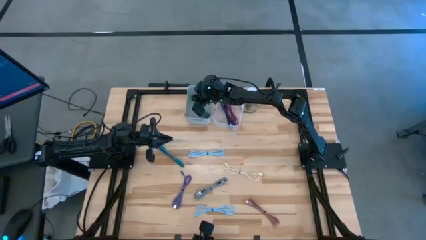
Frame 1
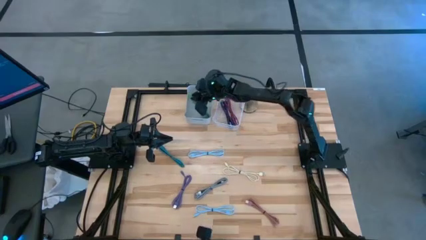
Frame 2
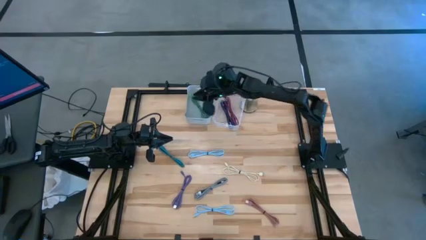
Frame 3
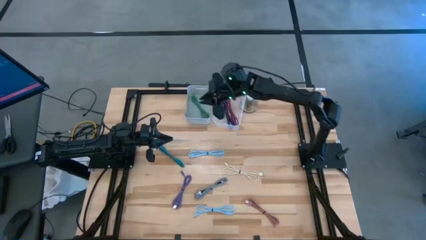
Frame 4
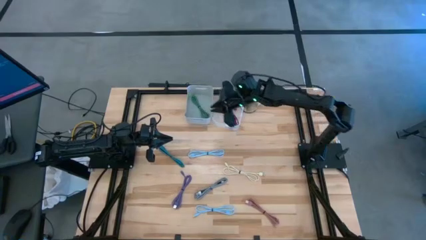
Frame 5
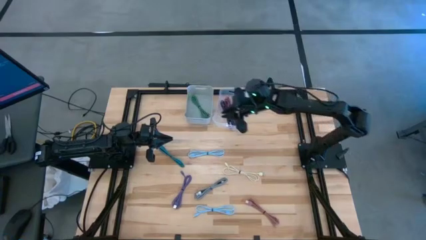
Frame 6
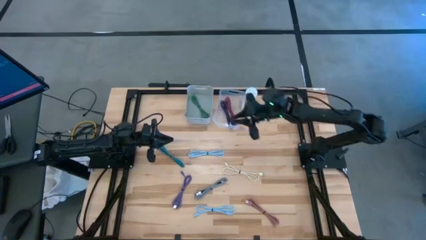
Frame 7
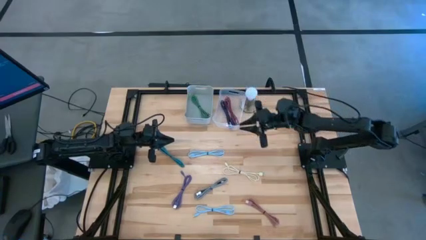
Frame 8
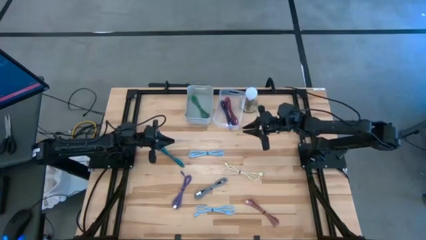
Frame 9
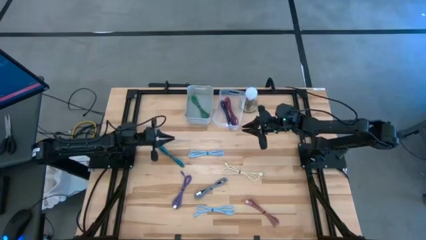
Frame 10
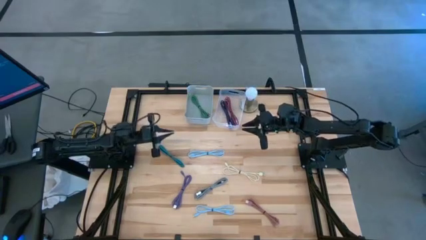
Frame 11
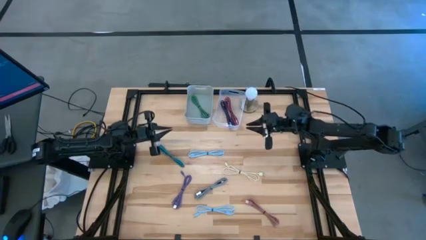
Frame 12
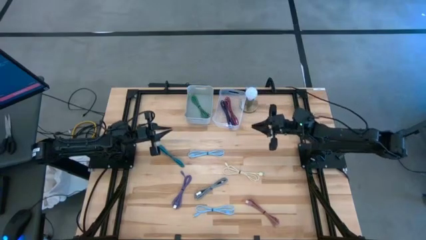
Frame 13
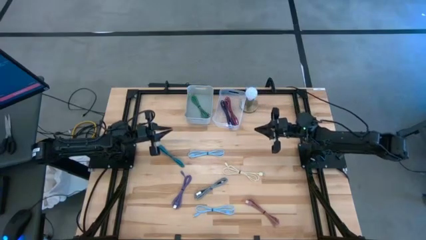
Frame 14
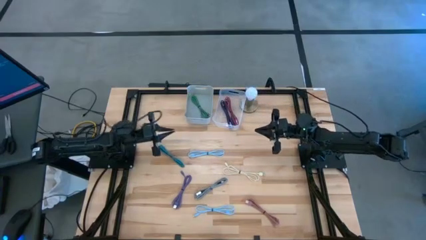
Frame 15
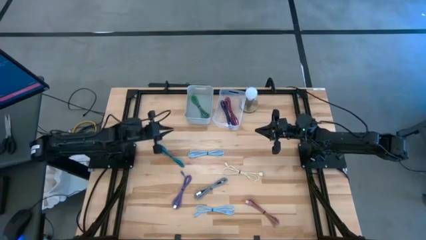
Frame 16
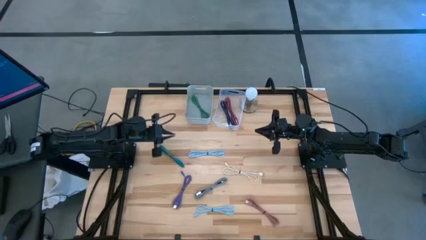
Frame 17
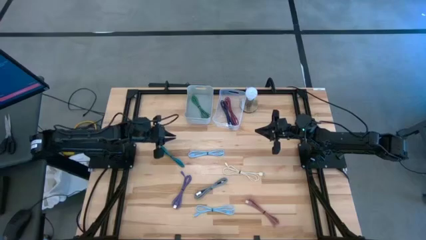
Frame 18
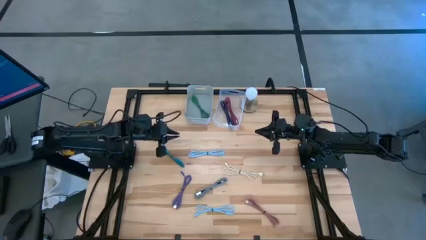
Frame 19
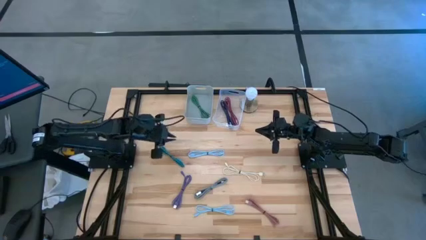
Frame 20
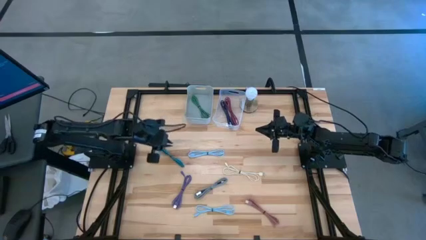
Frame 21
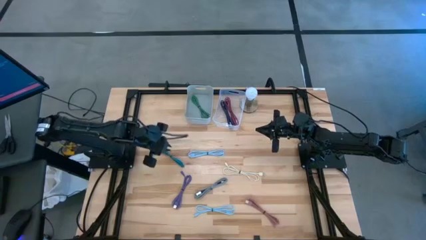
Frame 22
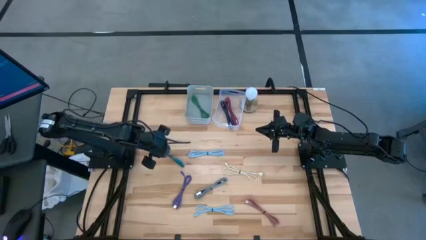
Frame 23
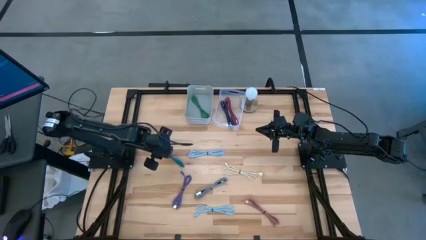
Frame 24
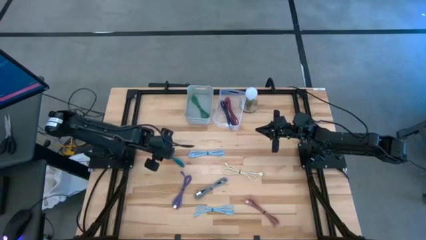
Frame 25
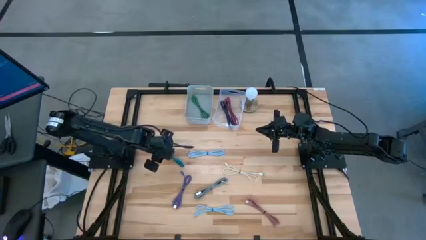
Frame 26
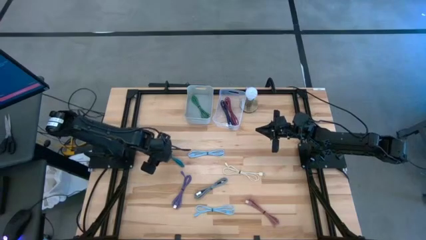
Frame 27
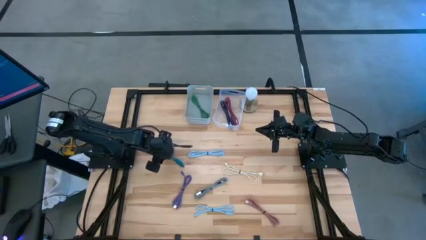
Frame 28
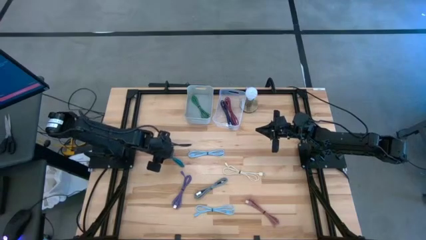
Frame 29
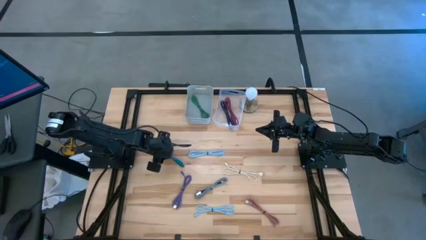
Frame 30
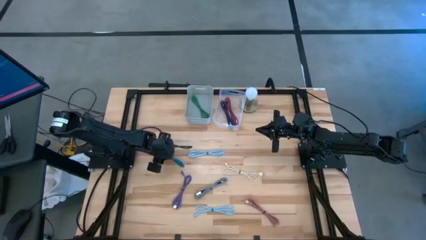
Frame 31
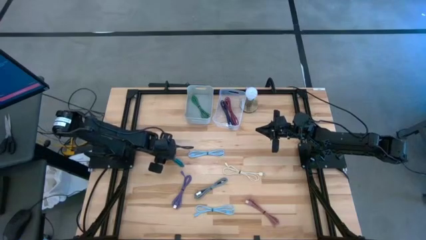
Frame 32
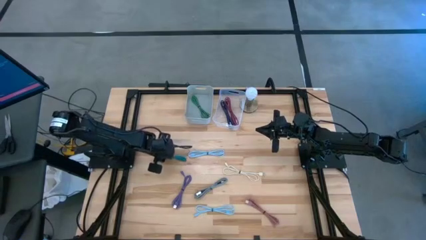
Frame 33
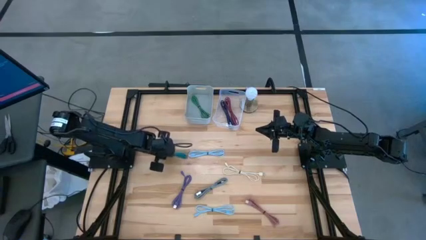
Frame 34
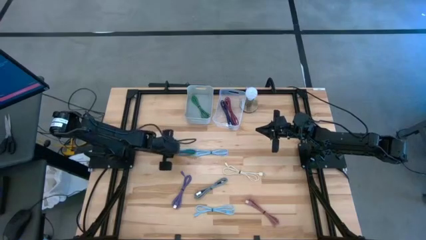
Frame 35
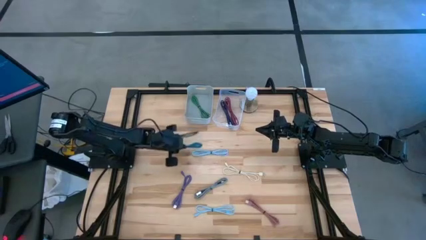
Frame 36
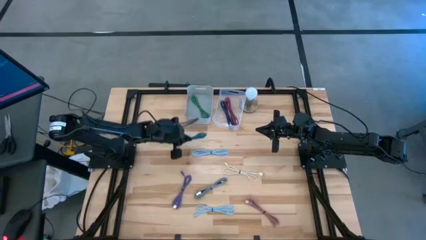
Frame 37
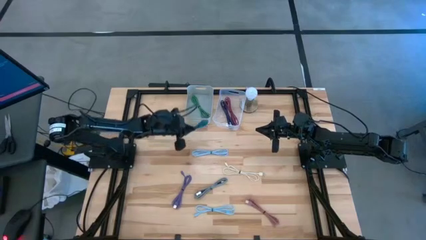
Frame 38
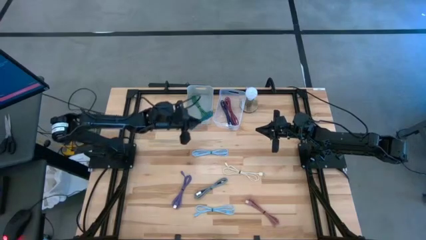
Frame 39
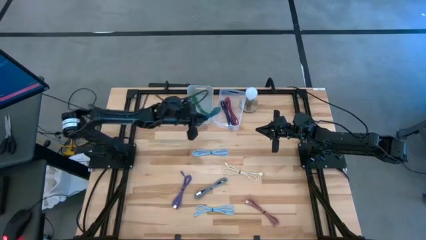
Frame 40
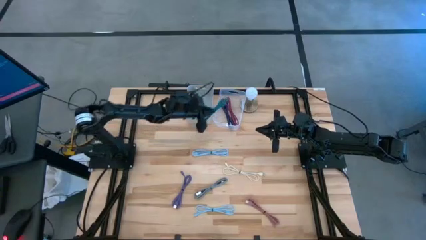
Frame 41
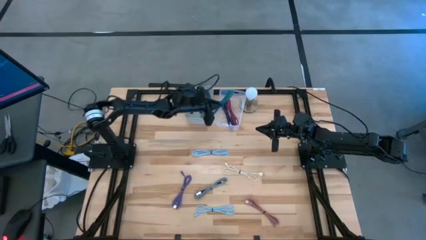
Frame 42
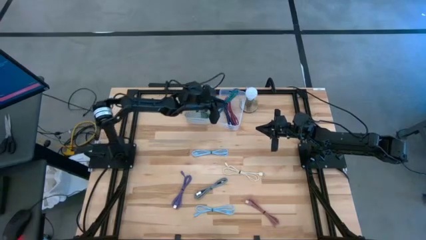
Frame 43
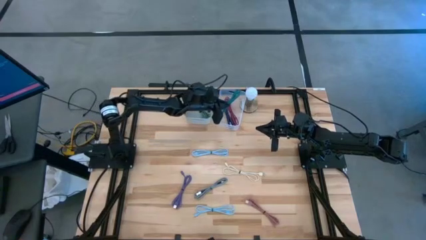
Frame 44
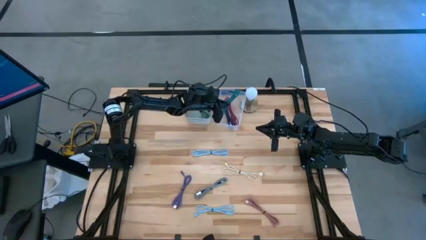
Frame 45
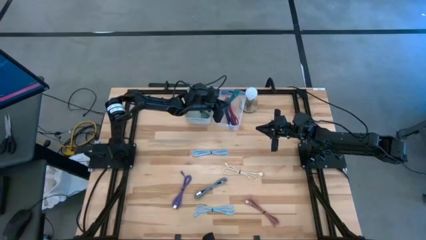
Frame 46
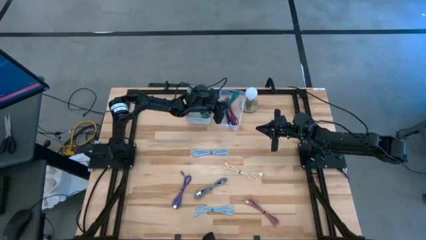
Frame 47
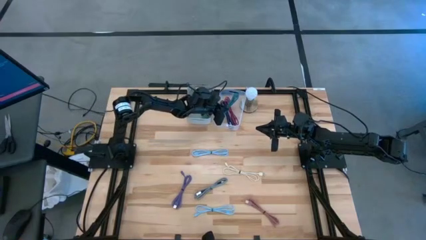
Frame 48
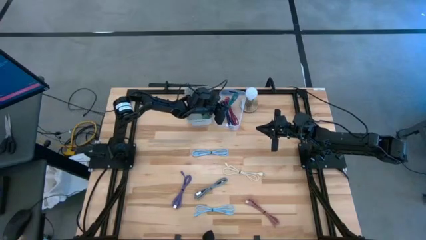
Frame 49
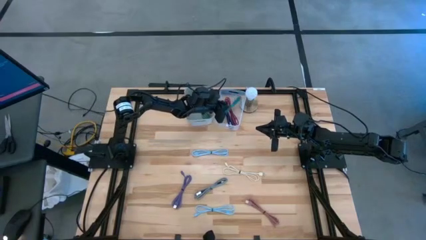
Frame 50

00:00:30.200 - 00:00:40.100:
Task: Pick & Place USB Port
Put the braided blue charger cable into the transparent bin

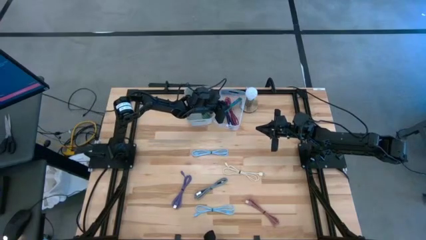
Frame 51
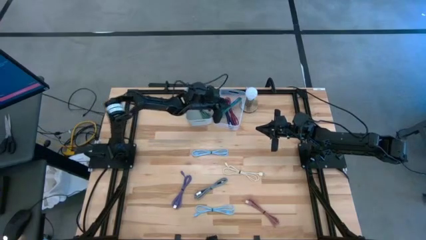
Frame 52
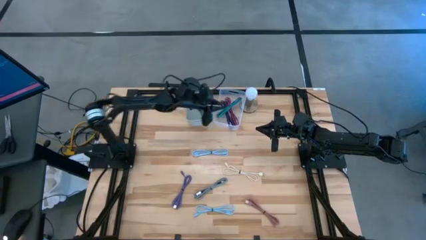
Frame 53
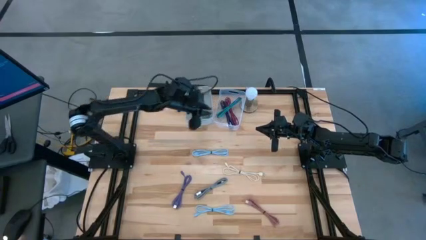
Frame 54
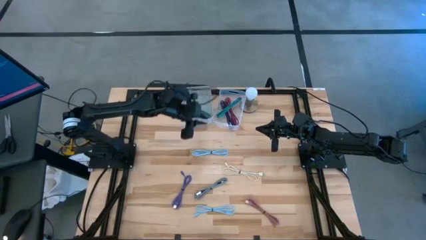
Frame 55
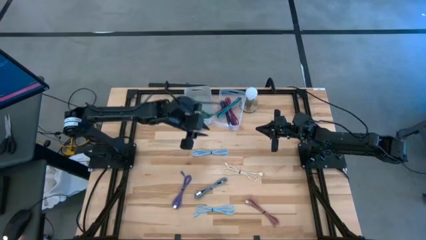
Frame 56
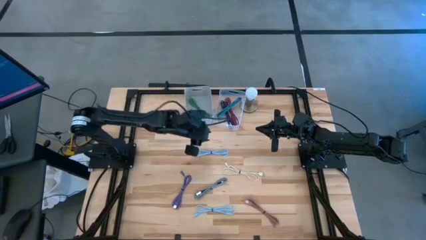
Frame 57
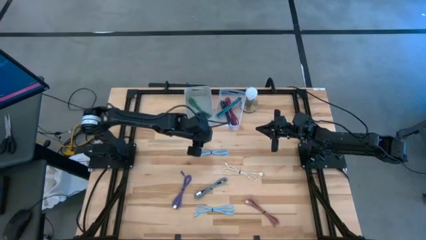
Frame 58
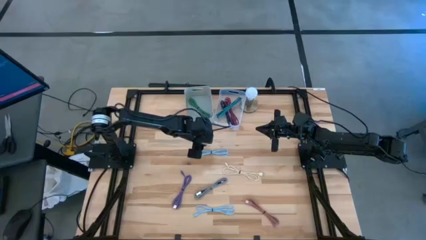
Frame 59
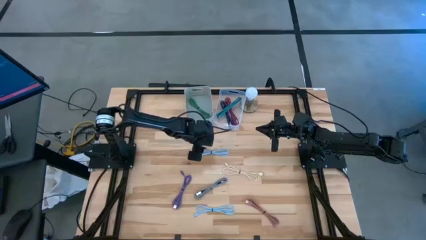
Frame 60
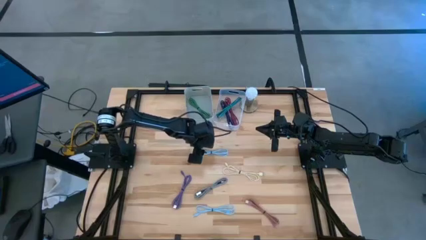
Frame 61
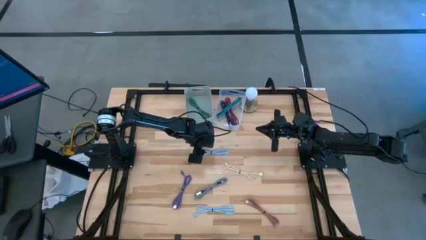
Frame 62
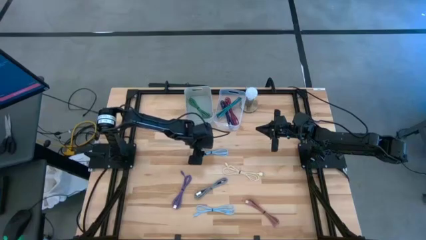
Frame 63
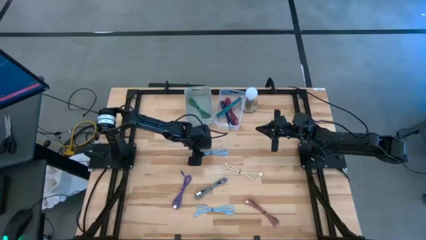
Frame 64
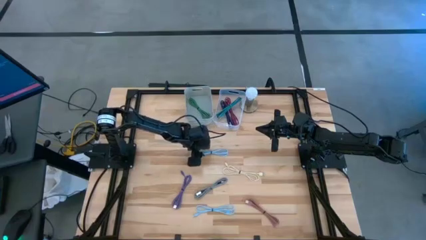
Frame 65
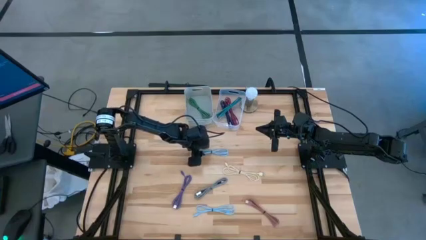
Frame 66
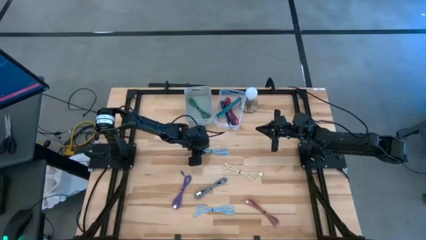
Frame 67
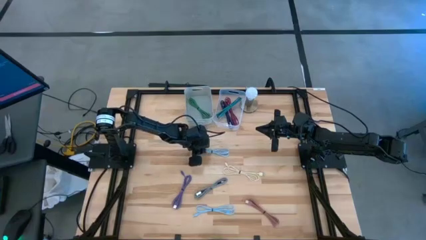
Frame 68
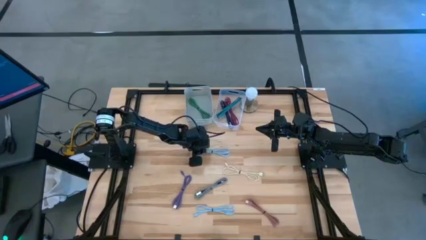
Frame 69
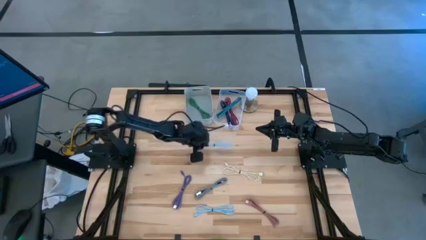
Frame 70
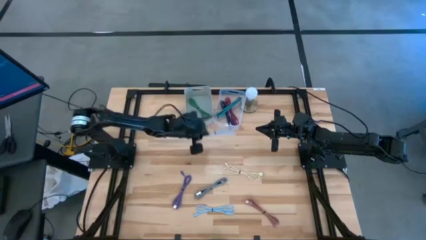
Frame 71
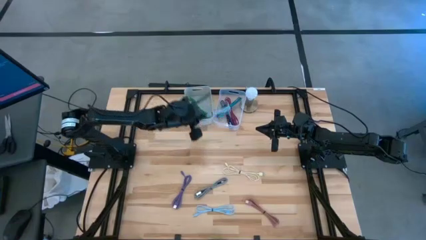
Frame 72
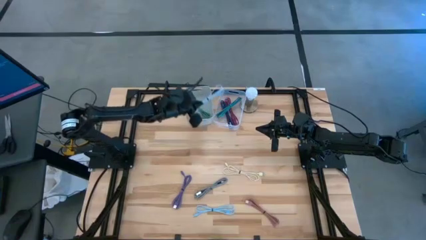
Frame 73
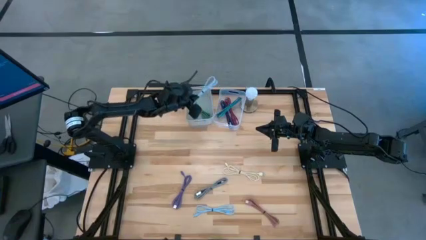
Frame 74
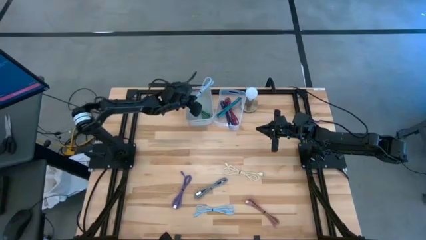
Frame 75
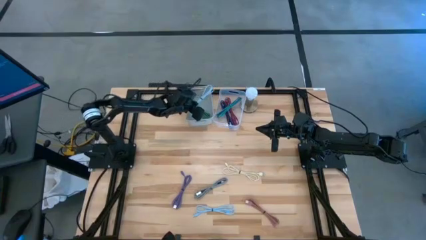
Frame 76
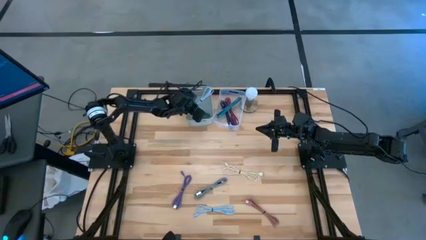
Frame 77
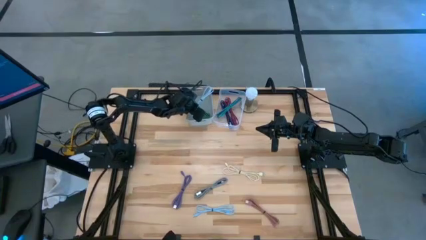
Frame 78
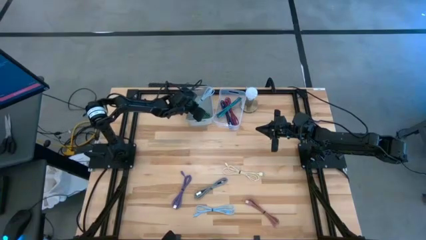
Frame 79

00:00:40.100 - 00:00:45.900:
Put the light blue charger cable into the white bin

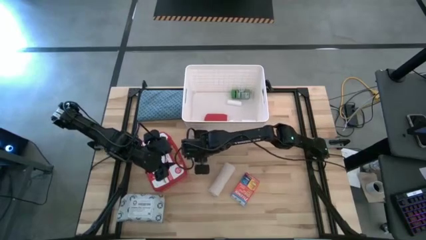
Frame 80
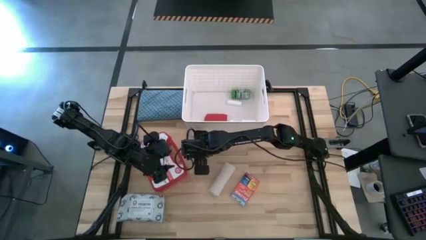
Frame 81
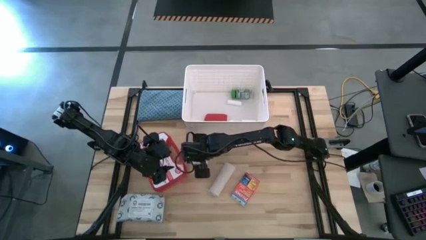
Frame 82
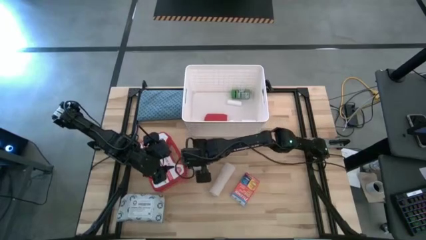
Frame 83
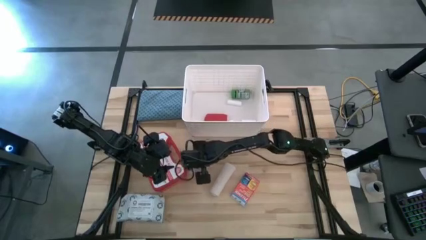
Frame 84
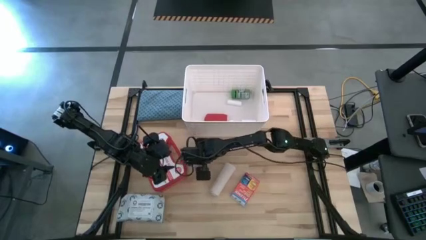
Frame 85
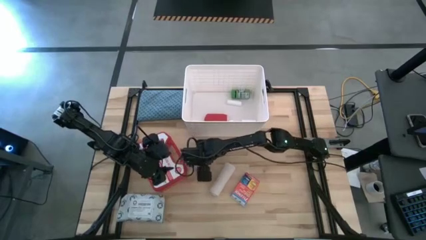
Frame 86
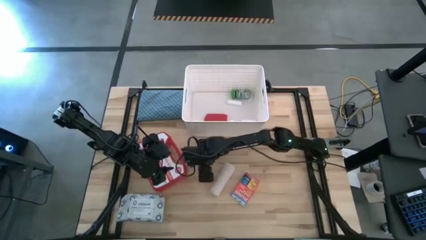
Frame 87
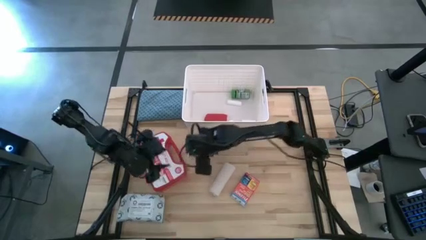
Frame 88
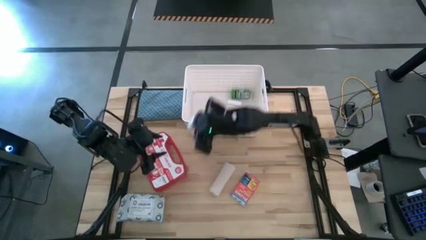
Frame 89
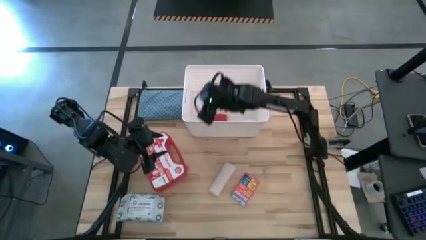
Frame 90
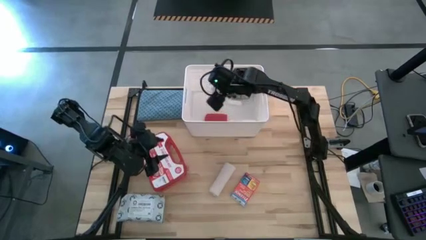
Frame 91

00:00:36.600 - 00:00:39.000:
Task: Pick & place medical supplies in basket/bin
Put the white pill bottle in the white bin
